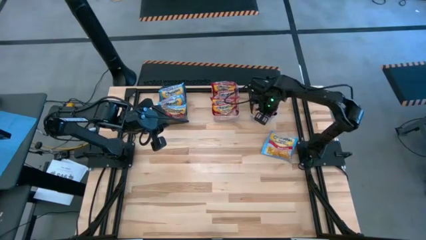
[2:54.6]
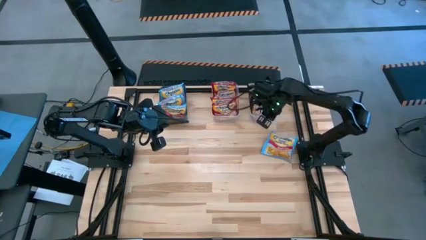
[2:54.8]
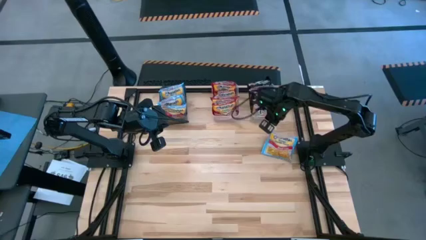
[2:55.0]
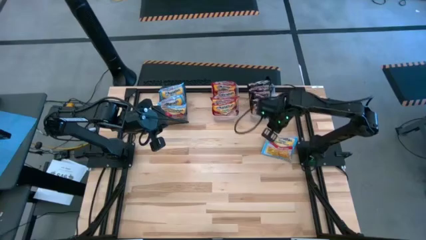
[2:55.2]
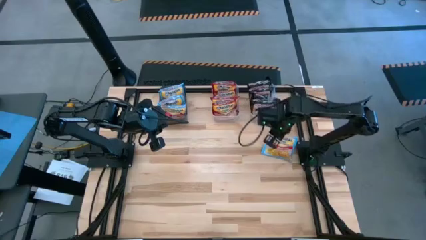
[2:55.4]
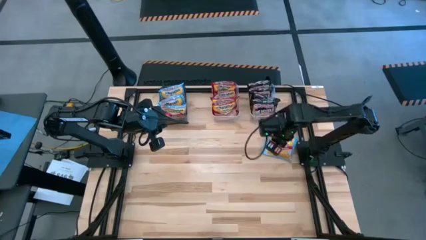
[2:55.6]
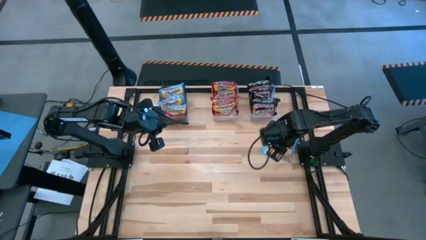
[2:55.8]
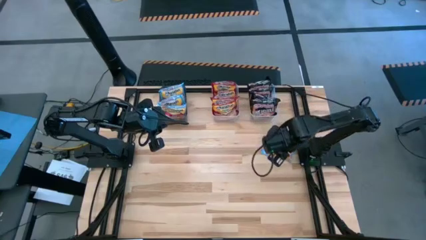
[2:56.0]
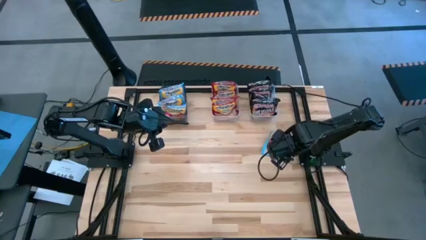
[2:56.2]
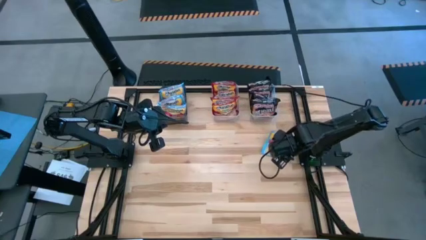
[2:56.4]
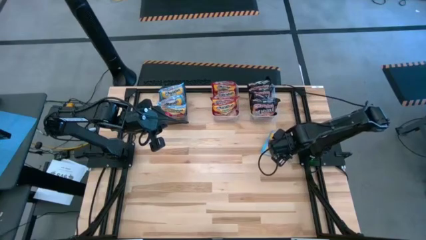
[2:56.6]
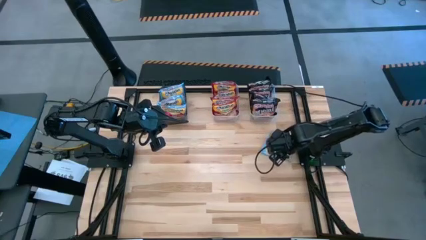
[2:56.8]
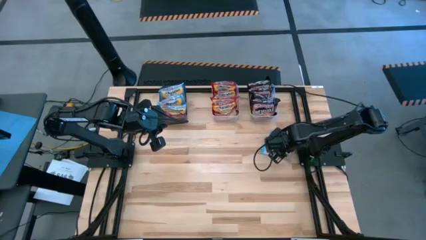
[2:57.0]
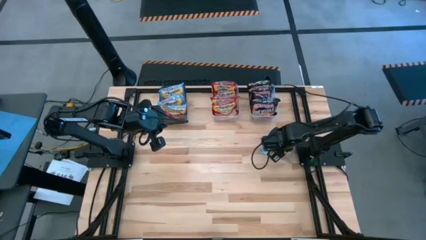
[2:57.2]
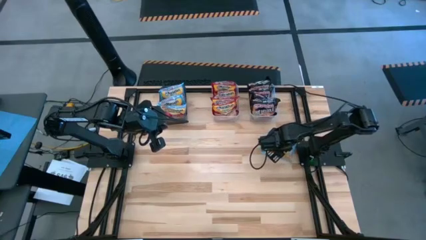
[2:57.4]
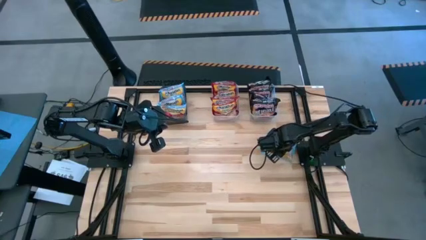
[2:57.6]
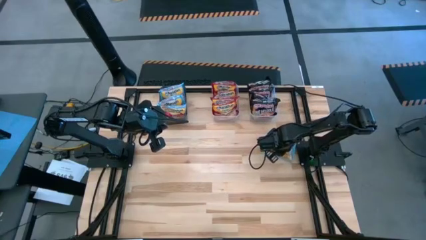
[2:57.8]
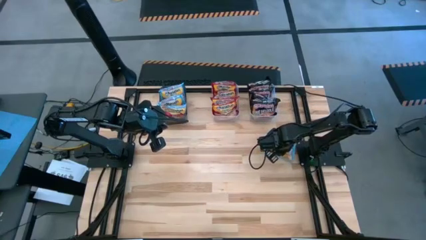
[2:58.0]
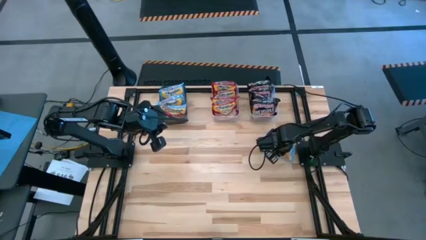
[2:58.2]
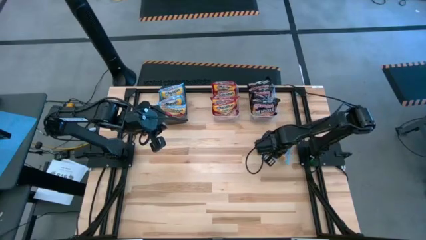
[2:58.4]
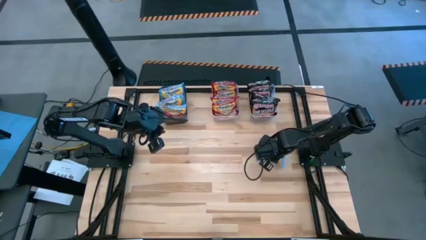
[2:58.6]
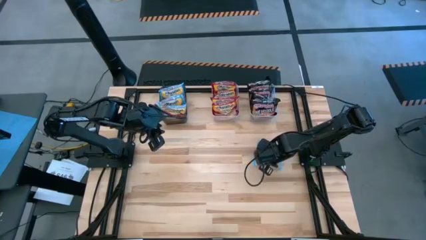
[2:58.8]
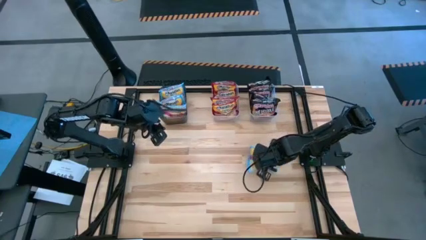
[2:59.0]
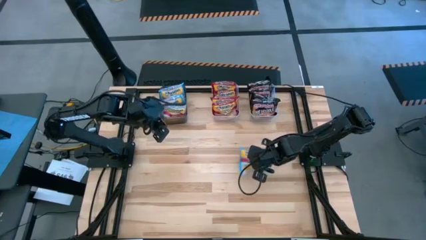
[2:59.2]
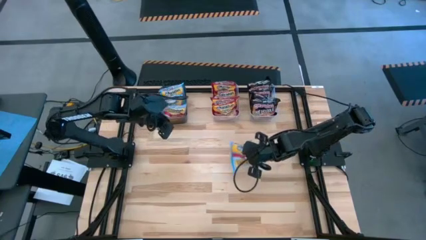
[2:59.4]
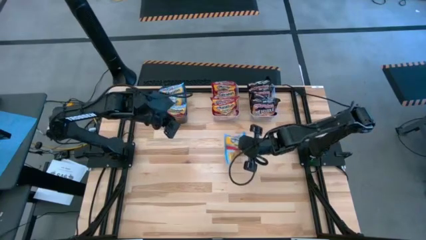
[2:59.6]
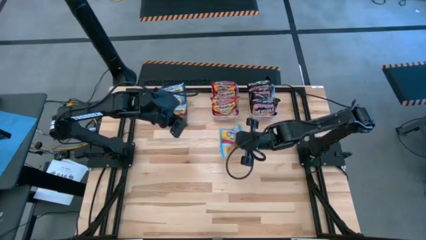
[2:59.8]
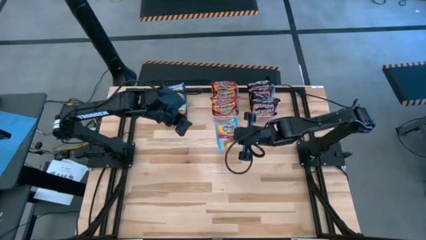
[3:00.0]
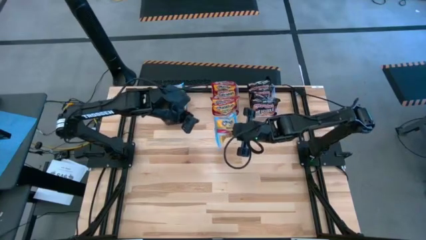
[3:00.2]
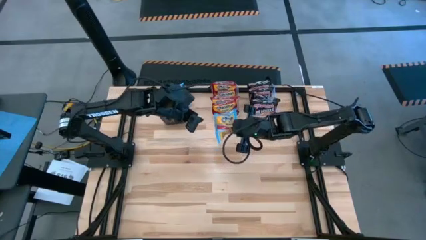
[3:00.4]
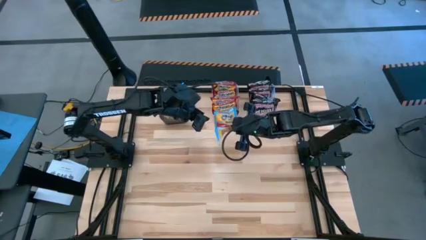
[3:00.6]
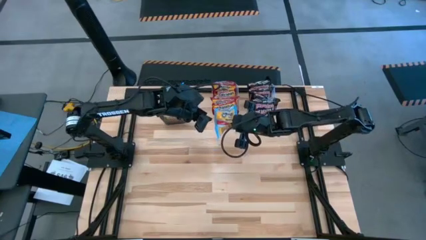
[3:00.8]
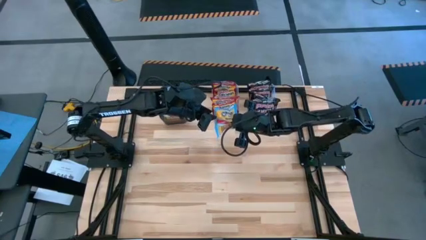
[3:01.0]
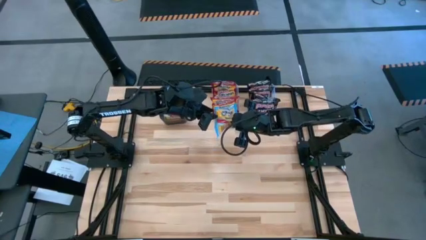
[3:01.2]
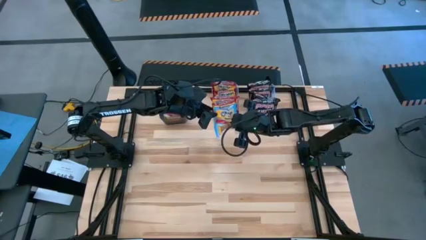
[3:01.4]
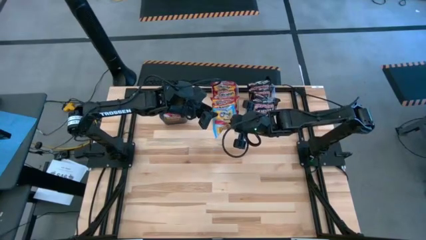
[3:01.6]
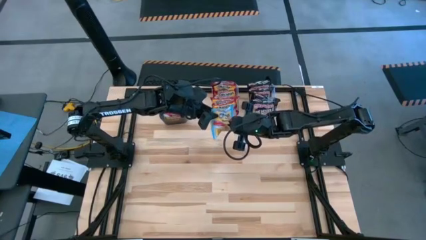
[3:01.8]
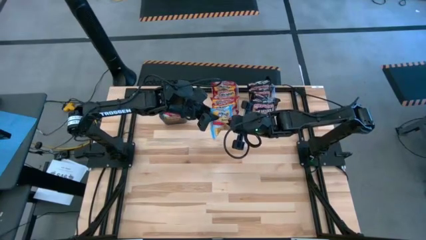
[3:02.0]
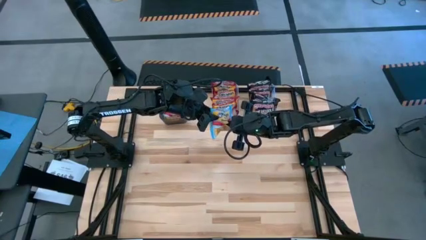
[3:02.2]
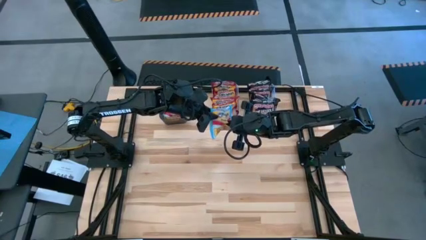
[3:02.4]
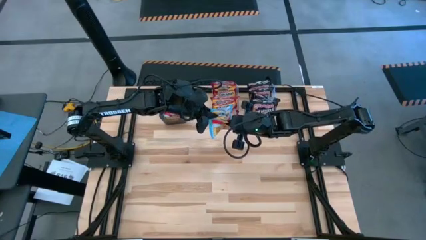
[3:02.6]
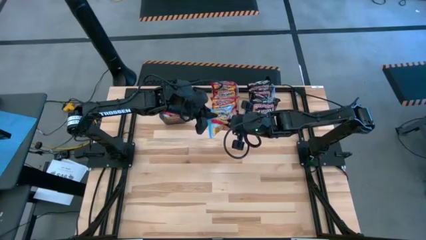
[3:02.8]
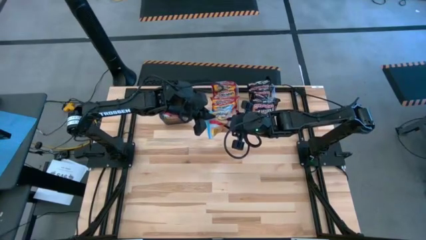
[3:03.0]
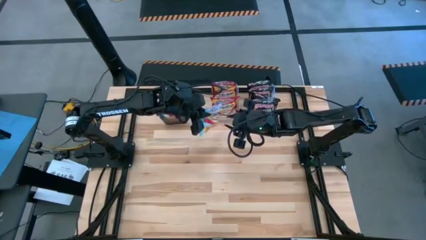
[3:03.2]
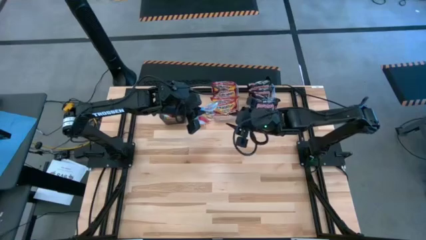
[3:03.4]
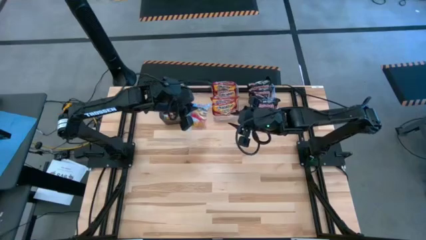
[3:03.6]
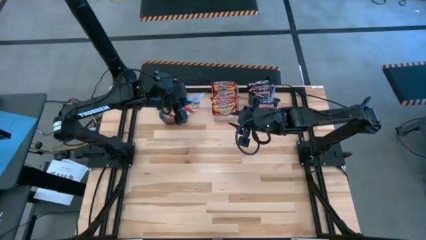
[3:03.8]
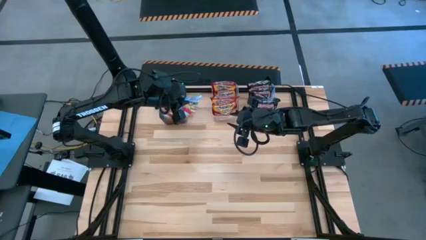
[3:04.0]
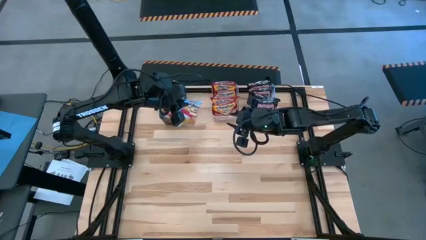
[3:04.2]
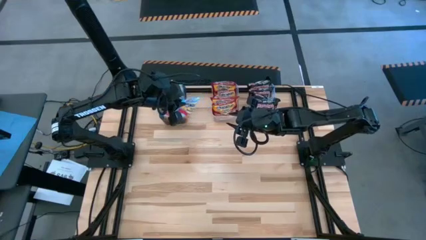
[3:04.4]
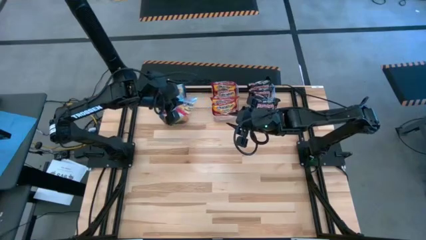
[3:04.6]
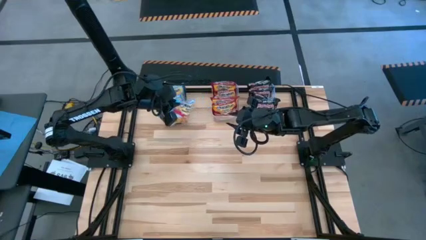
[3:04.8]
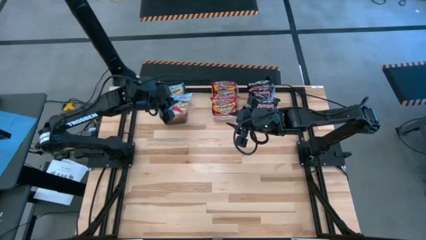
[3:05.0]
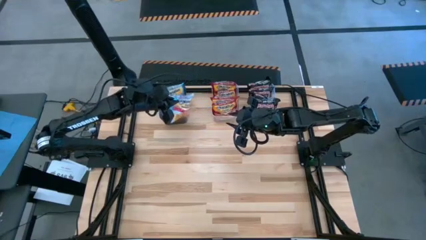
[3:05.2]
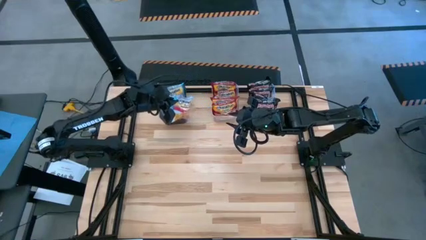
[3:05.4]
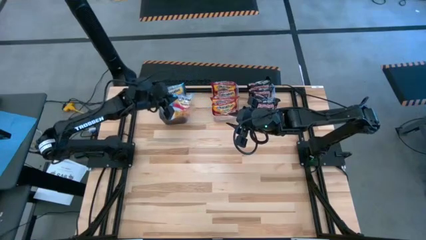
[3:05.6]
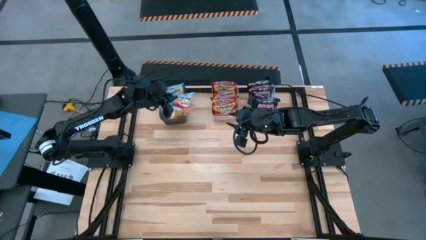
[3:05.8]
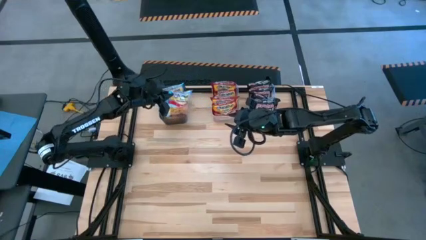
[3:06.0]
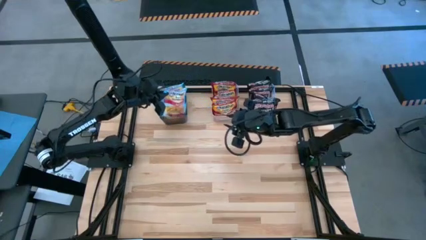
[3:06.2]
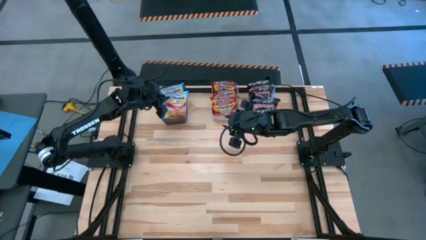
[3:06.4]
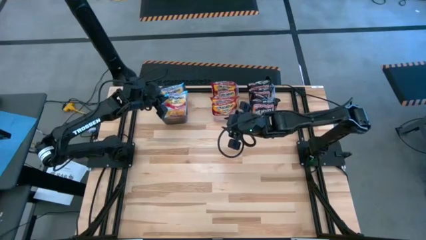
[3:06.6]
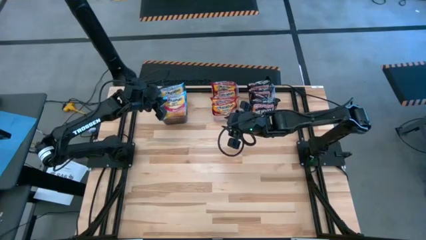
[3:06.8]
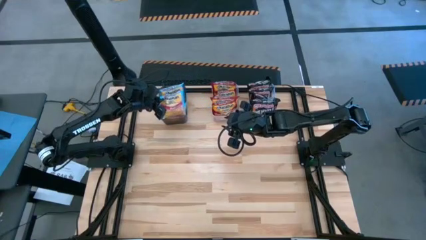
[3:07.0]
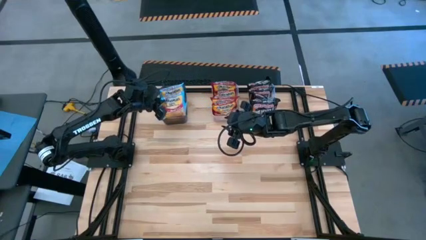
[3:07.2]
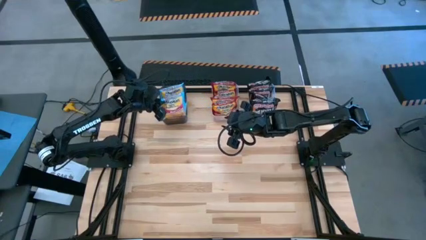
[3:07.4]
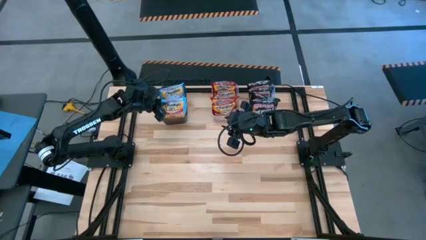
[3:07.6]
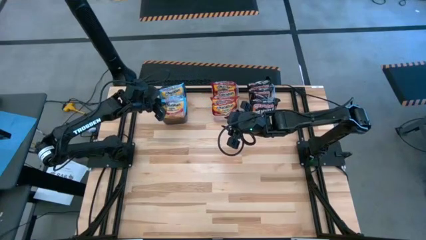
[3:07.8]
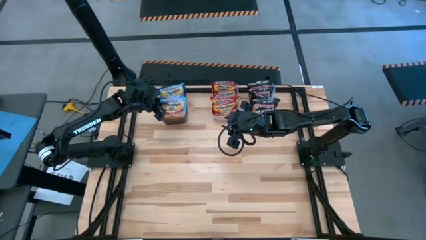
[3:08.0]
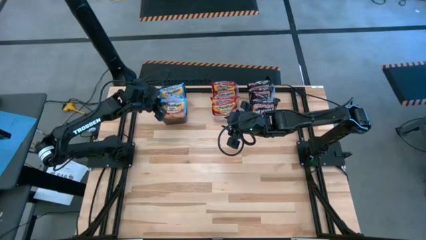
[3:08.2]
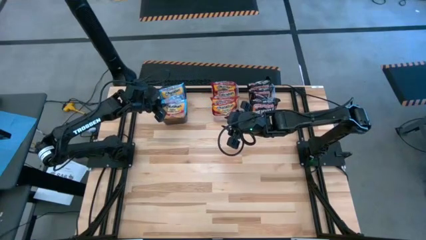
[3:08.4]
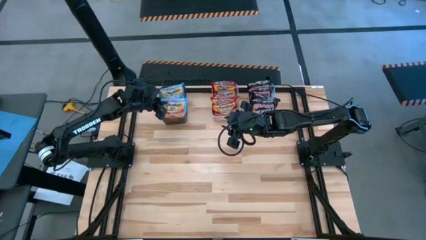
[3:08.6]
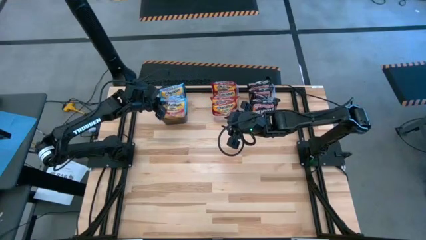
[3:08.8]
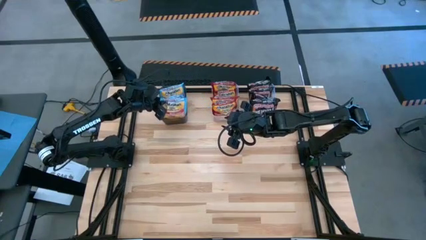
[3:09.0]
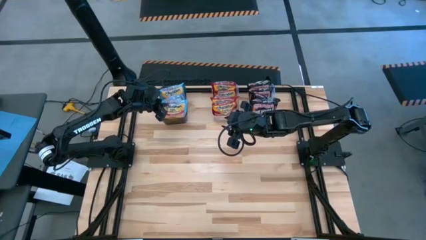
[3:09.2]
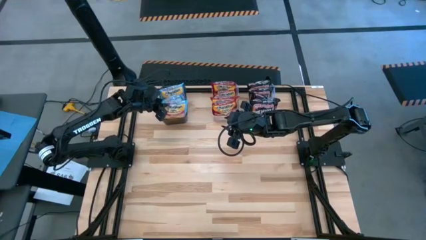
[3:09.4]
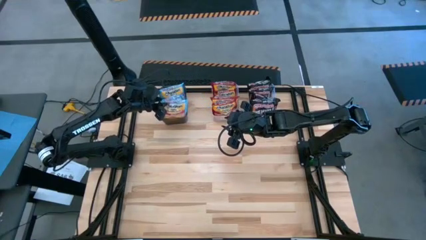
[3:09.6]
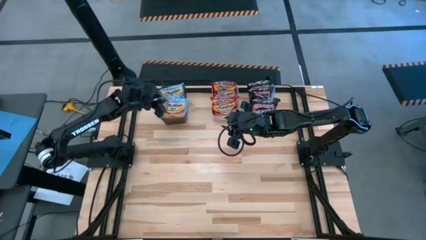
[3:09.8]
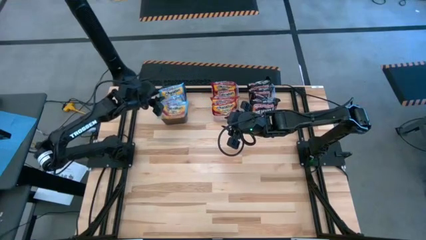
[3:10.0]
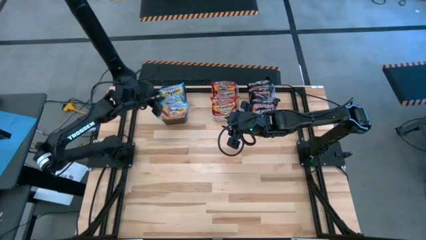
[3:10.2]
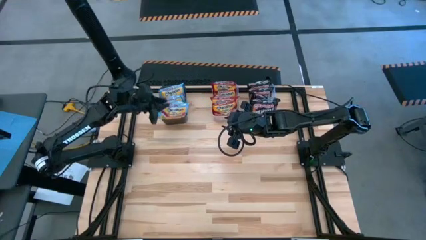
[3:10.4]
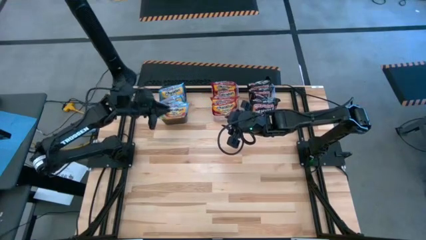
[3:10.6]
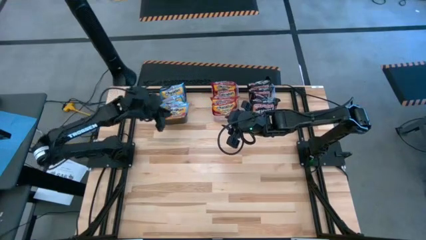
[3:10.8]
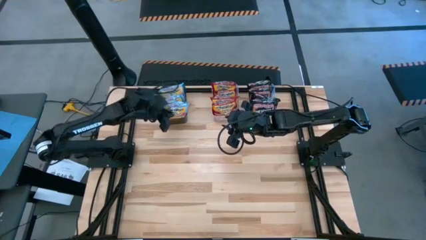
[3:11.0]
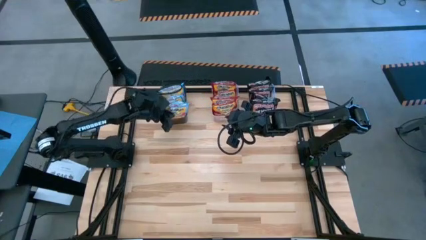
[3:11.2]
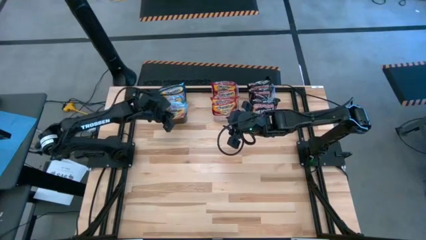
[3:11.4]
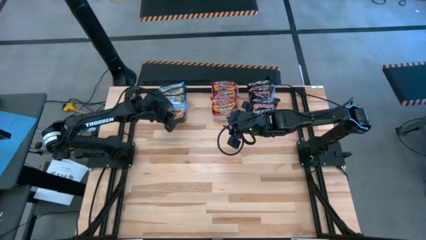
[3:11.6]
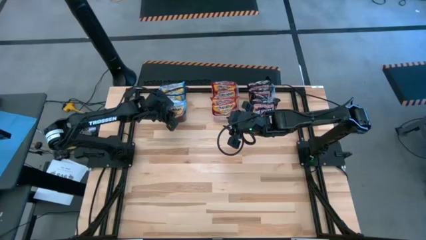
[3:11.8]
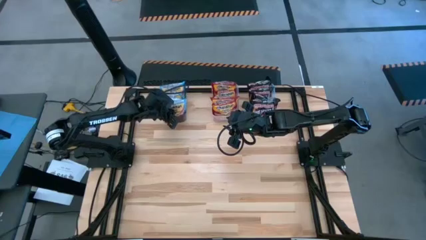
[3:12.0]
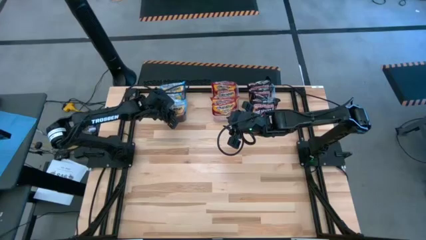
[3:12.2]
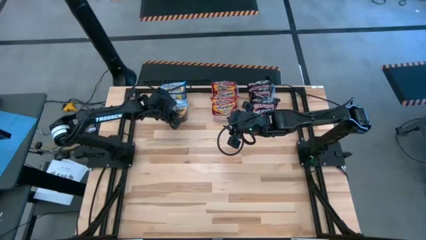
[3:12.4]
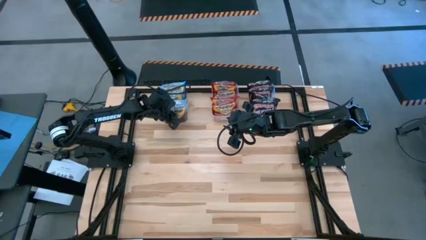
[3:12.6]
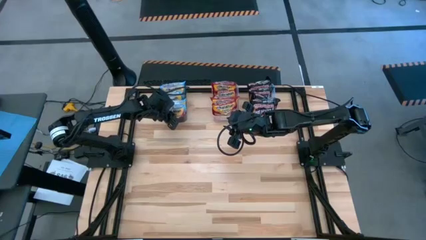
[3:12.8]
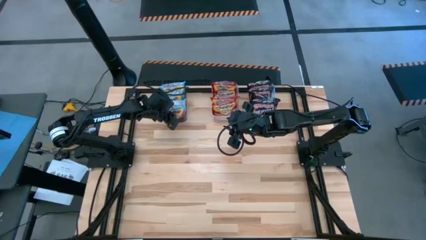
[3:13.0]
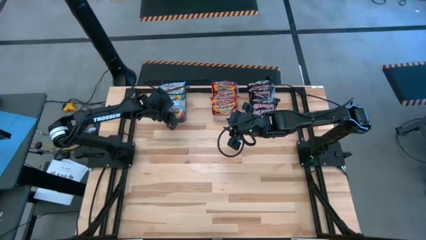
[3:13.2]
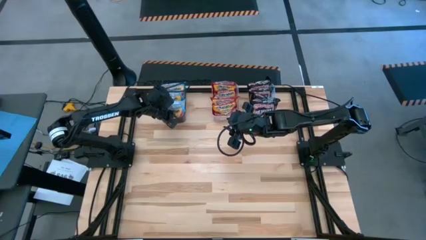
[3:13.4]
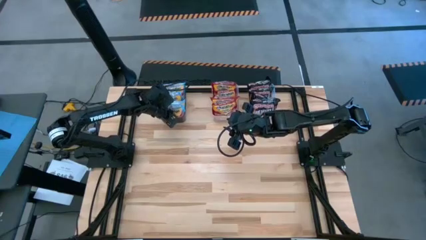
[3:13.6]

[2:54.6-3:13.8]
Task: Sort Maruchan noodles
Put the blue noodle pack into the black bin
